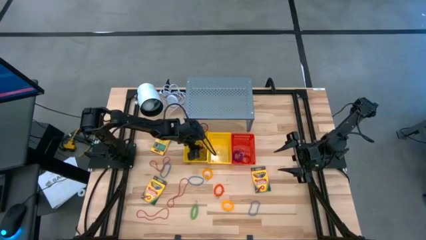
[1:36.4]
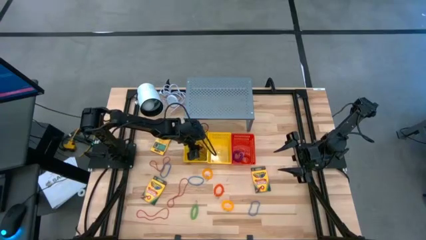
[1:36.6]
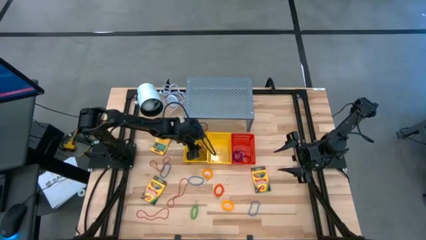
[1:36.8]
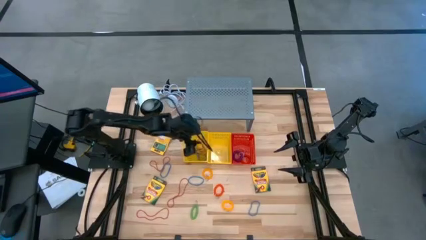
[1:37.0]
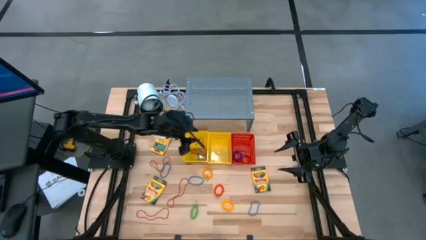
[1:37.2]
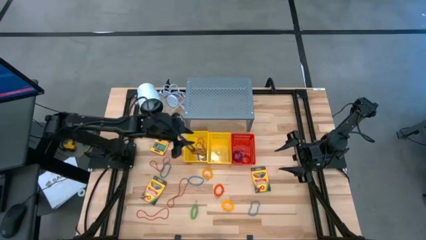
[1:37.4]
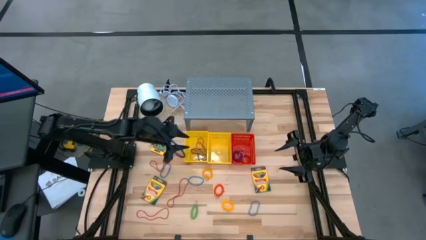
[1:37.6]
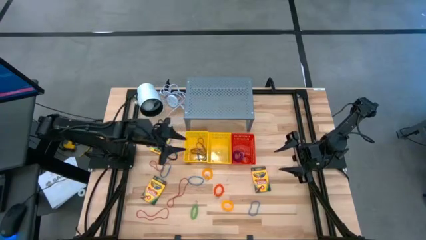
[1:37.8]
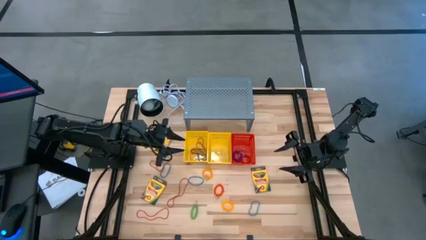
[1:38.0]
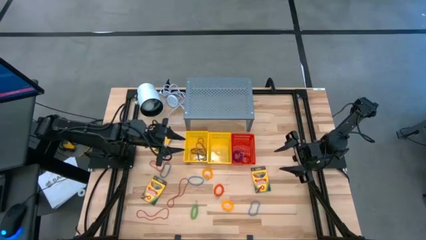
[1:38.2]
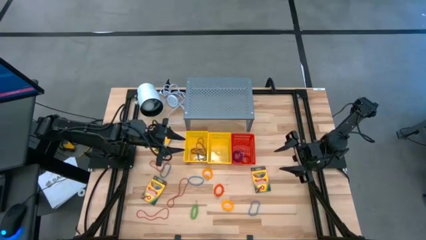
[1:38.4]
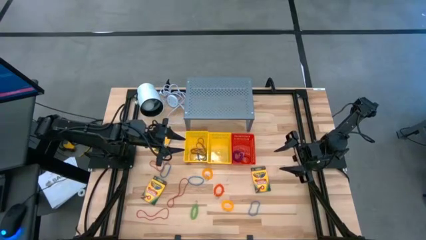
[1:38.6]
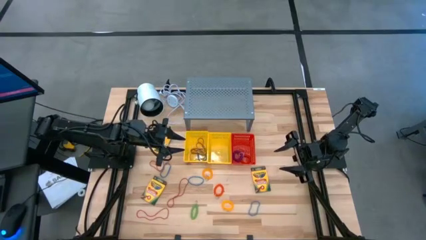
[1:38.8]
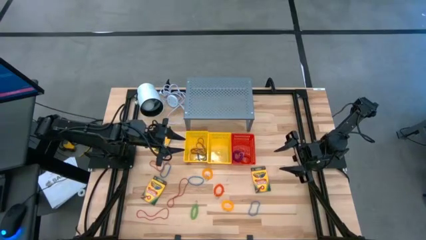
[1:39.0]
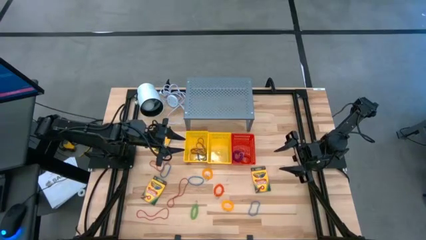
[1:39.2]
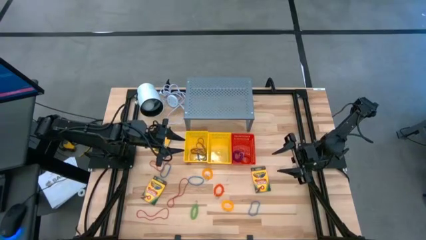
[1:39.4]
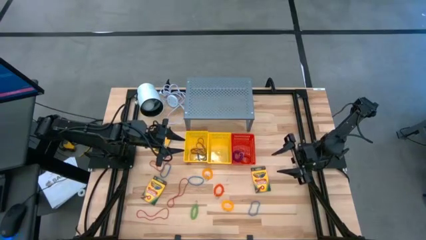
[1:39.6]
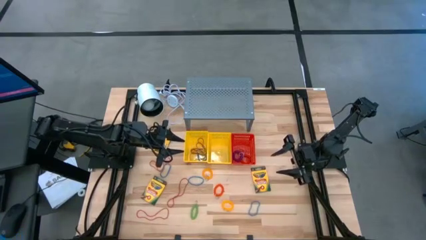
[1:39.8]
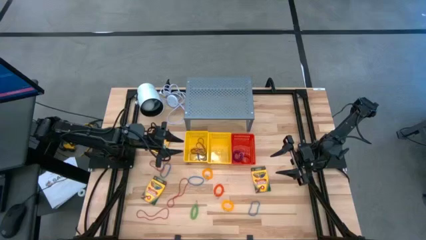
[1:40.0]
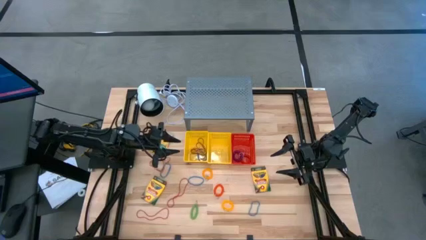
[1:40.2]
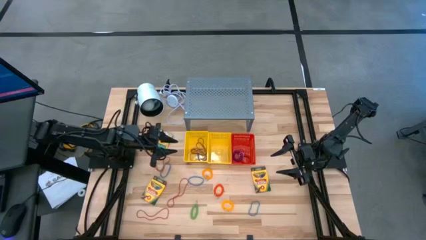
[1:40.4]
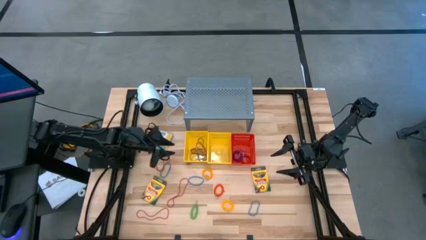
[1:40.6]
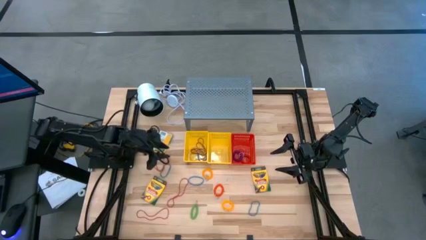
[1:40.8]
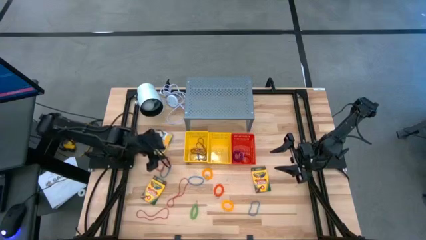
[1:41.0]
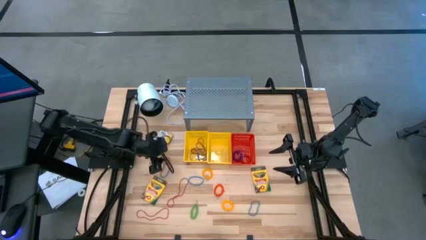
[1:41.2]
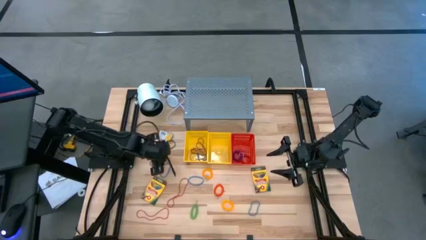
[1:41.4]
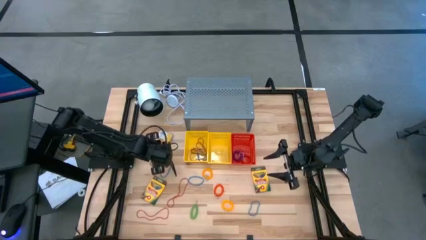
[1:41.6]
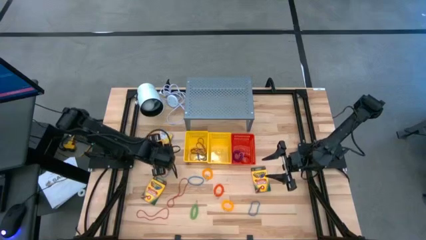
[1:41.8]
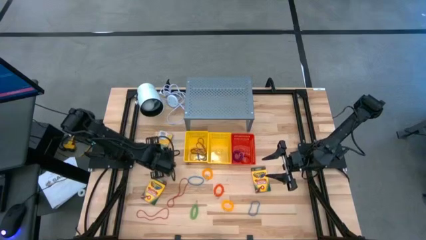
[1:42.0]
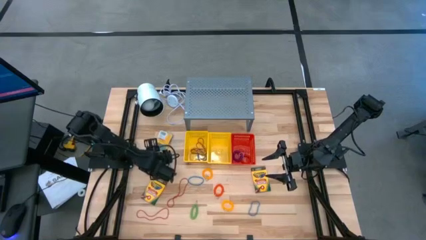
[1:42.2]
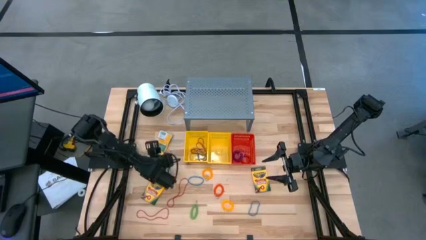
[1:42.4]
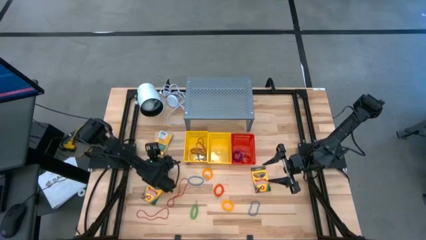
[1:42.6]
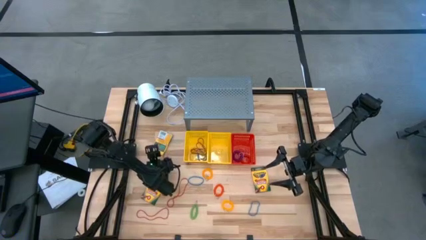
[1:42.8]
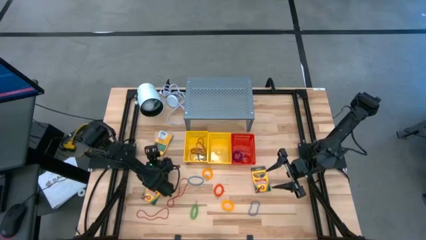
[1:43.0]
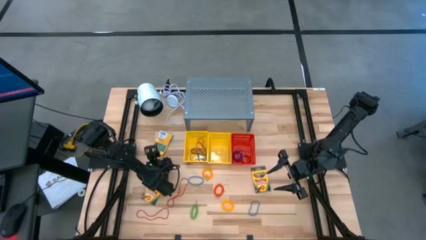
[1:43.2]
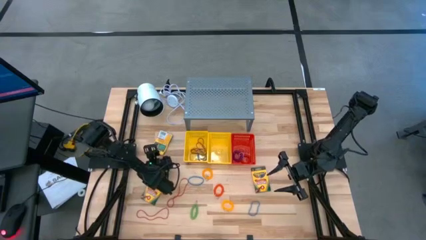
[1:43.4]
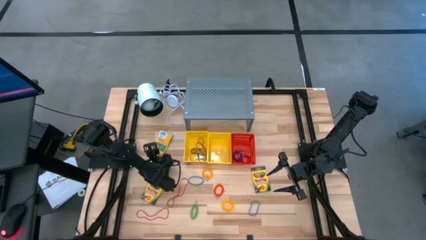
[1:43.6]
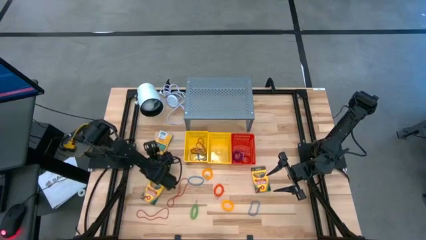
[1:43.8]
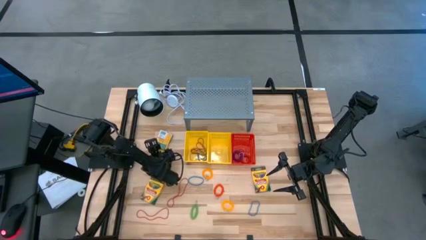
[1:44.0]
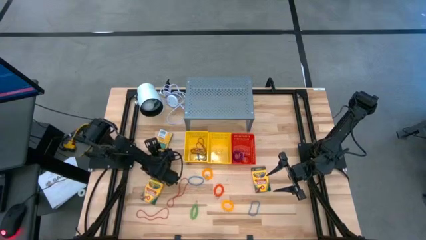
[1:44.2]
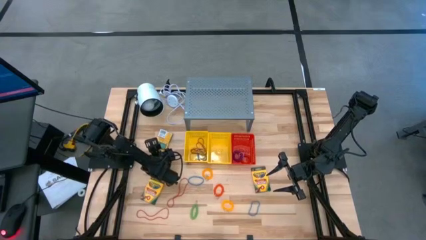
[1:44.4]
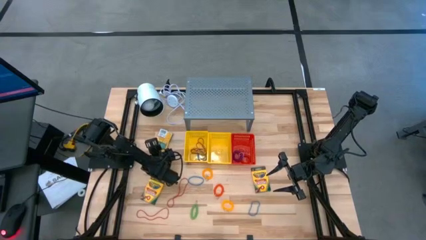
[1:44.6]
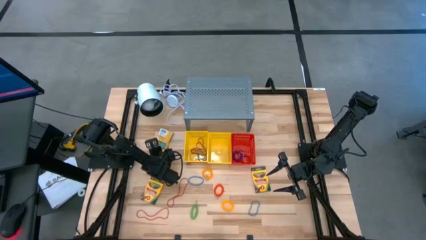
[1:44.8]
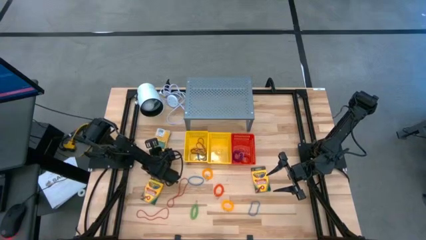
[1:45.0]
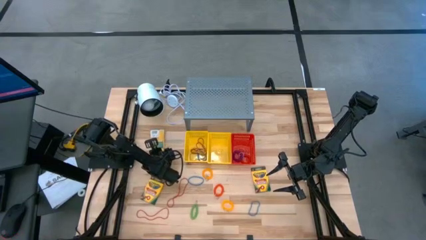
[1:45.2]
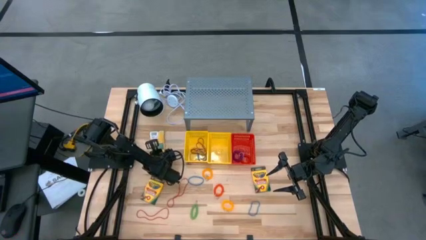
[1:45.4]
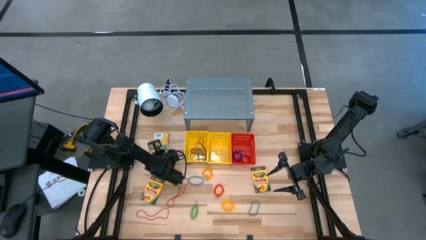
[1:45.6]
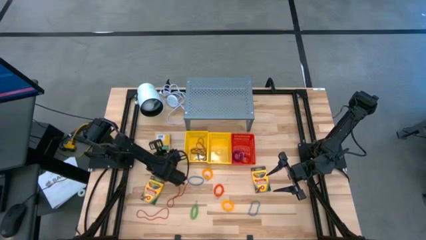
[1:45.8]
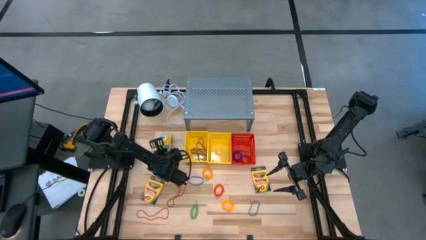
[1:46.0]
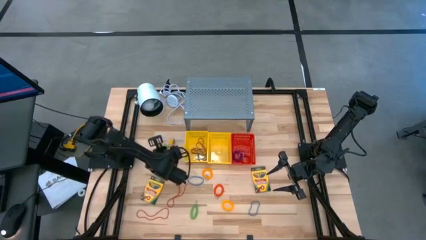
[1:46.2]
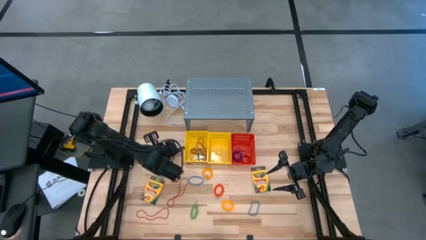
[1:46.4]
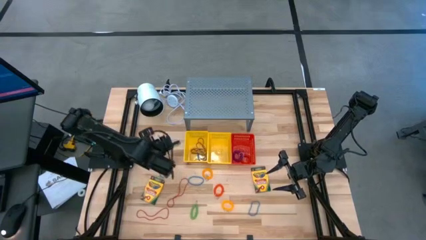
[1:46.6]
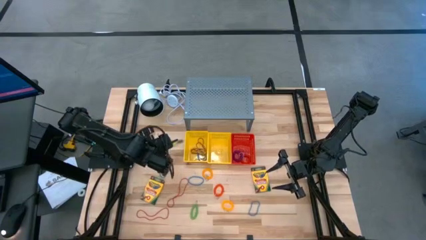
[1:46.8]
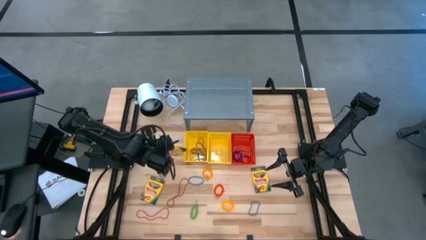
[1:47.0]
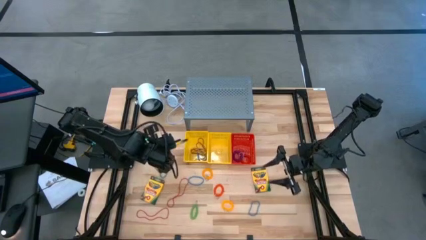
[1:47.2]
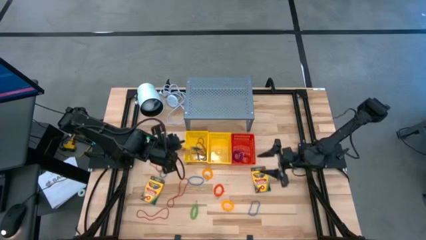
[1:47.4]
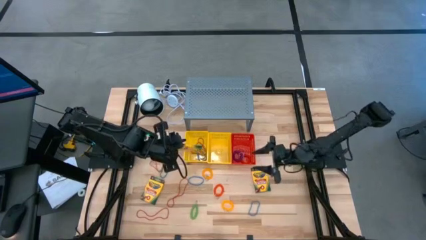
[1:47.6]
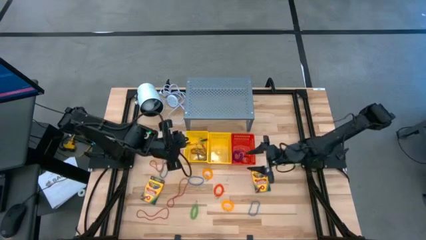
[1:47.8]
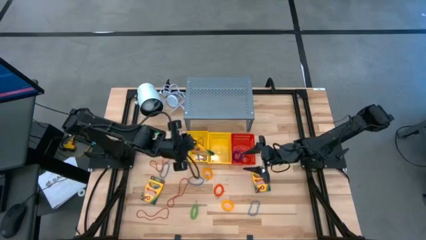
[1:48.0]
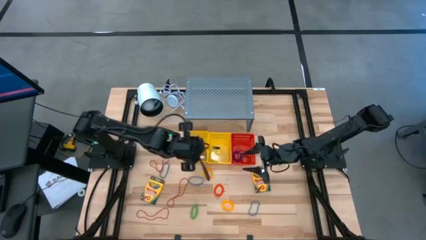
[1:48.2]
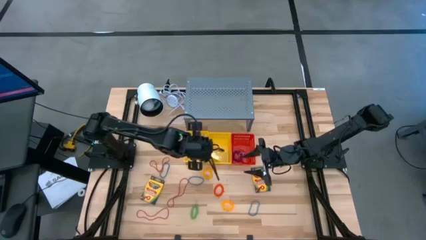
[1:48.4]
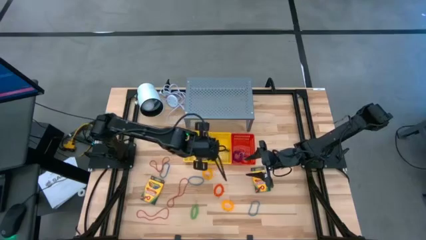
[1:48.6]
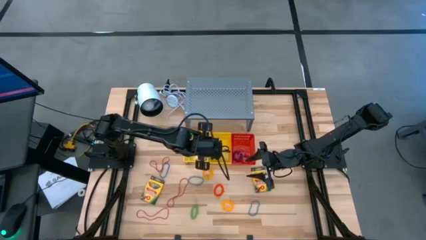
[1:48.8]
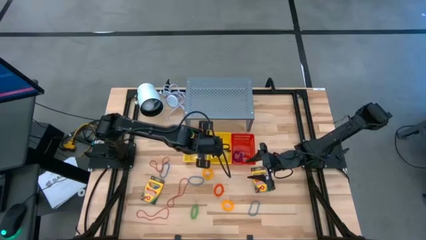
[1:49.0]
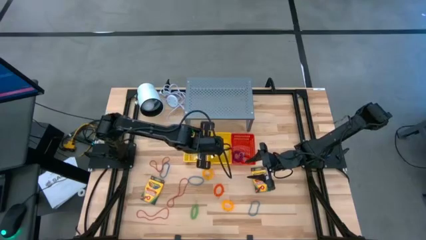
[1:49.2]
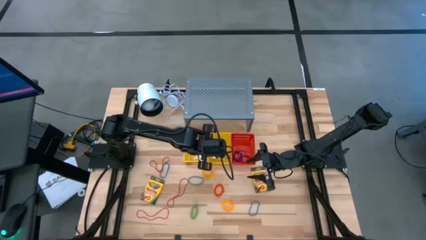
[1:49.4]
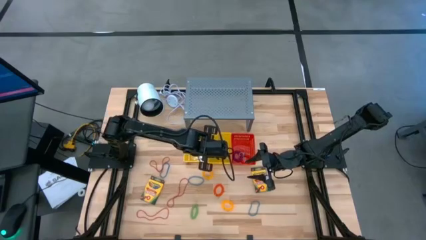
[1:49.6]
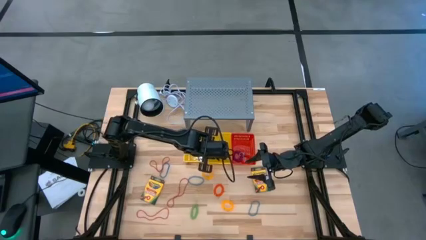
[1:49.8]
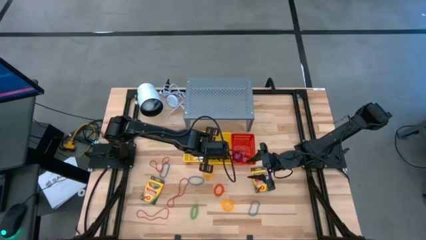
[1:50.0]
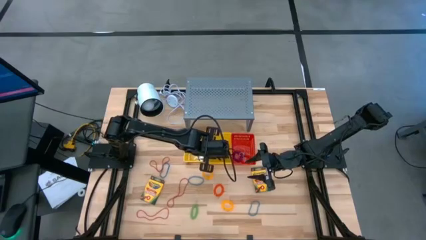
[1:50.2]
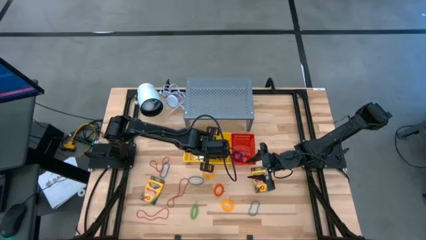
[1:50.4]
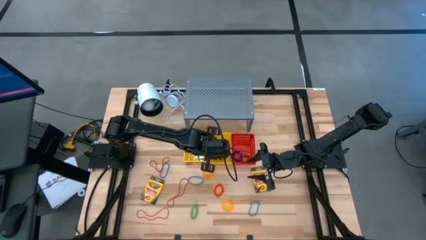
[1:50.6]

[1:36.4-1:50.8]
Task: Pick & Place Office Desk Supplies
Put the crayon box into the right yellow basket
